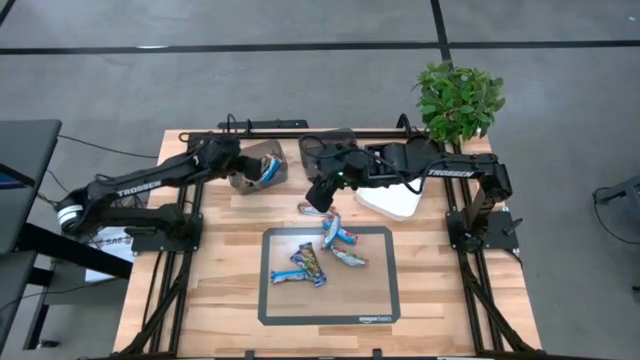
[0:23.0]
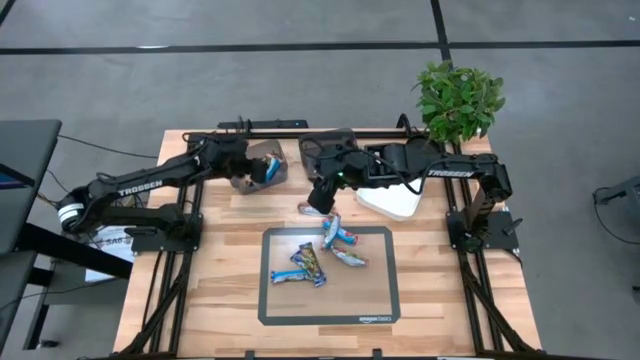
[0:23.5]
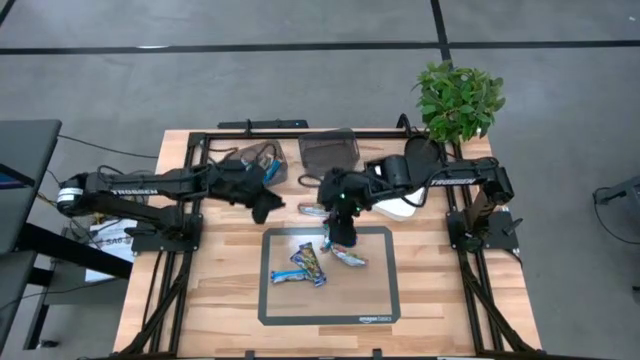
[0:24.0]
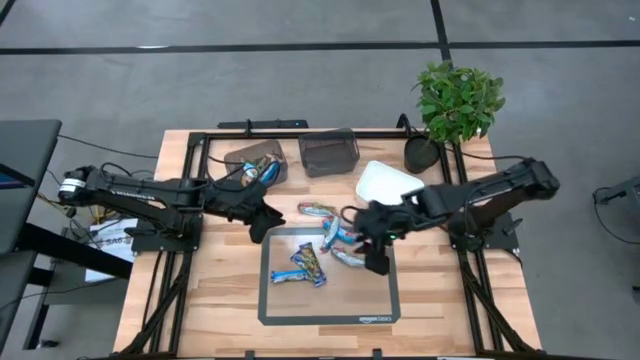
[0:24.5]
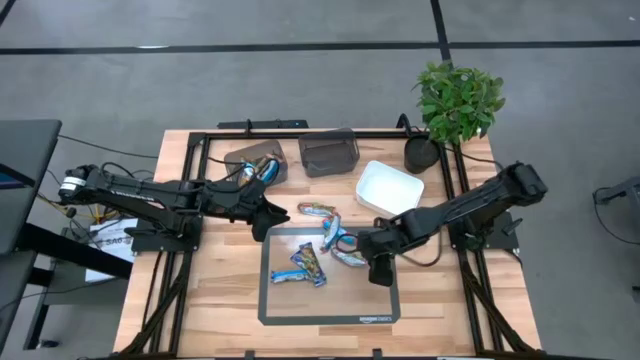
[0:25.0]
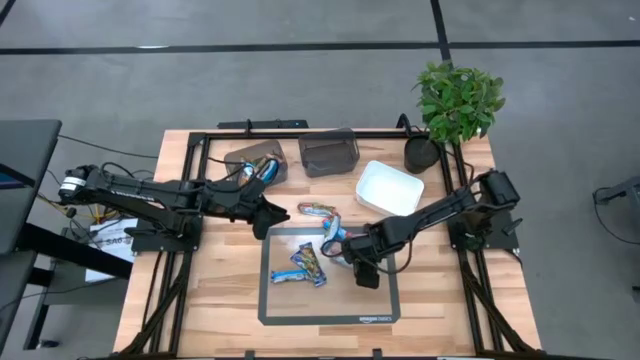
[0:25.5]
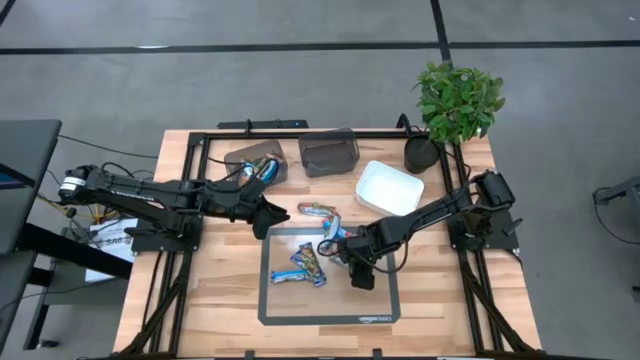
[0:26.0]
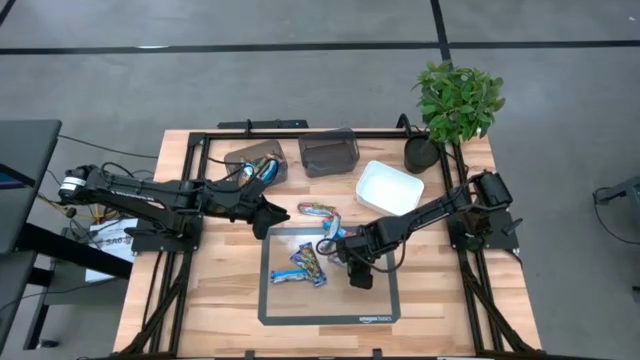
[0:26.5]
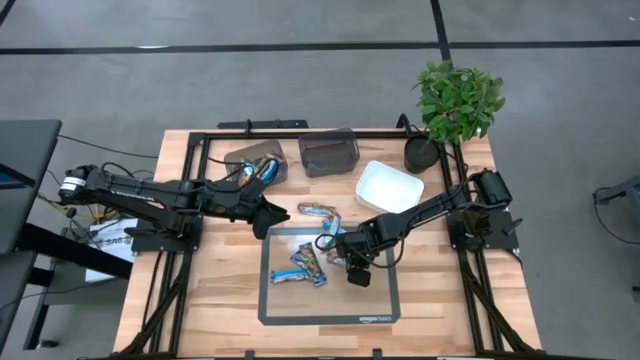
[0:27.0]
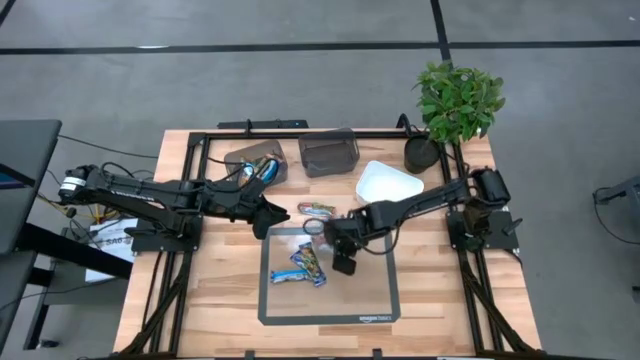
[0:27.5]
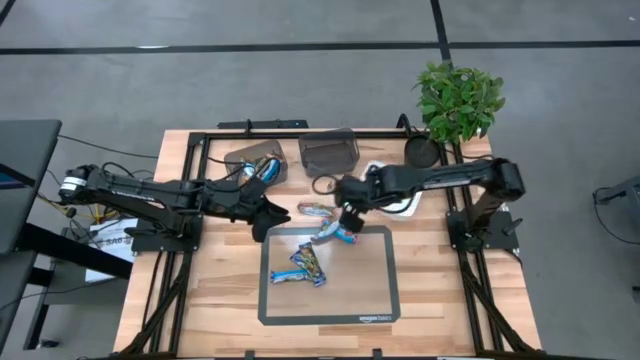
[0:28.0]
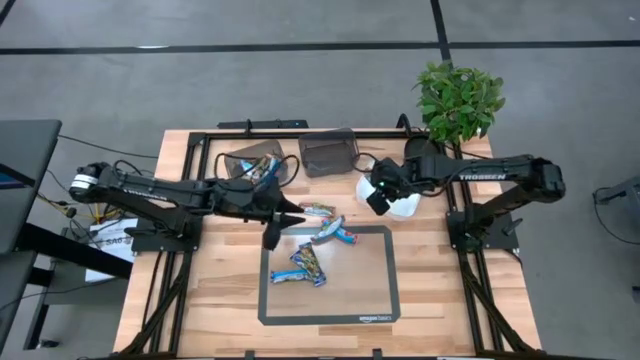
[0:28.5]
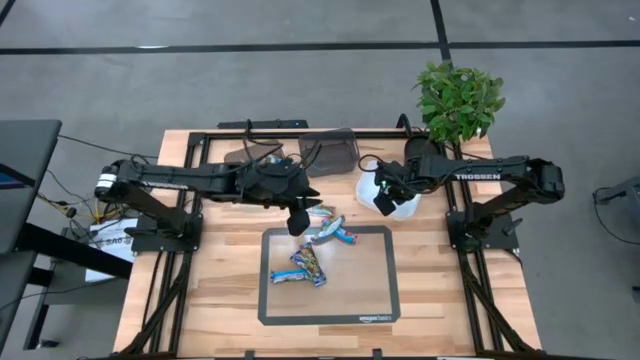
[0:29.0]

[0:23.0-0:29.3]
Task: Pick and place Granola Bars by type
Put the red granola bar into the white bin

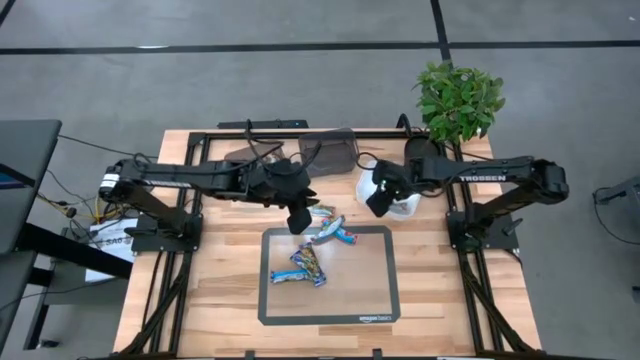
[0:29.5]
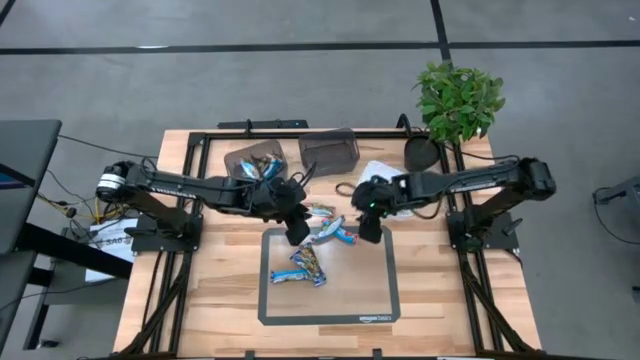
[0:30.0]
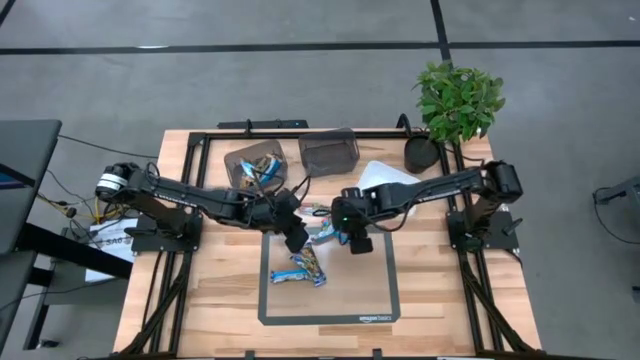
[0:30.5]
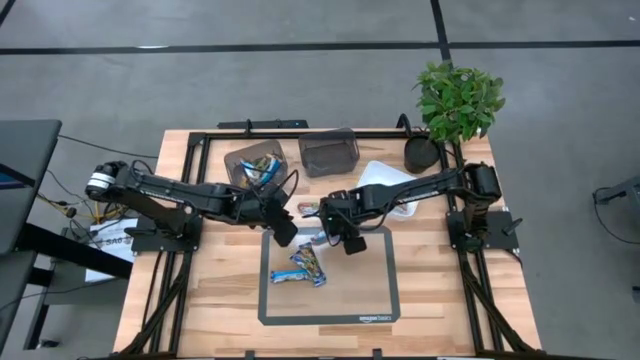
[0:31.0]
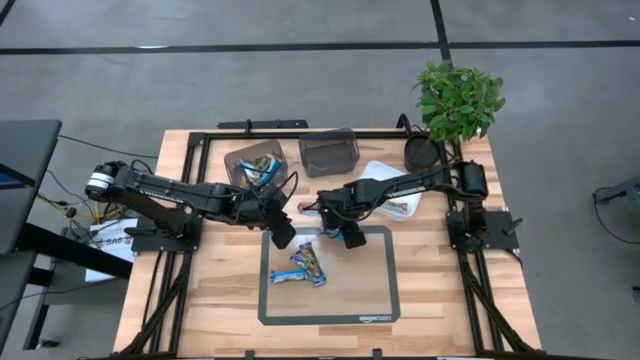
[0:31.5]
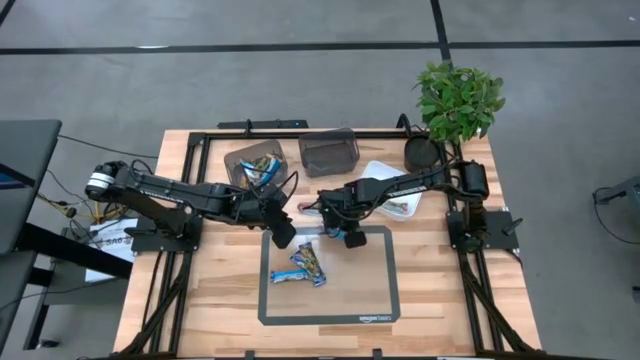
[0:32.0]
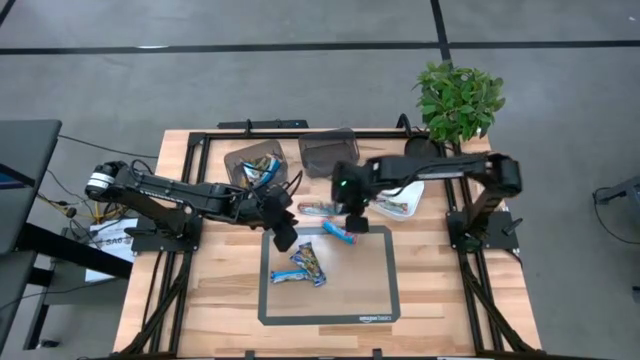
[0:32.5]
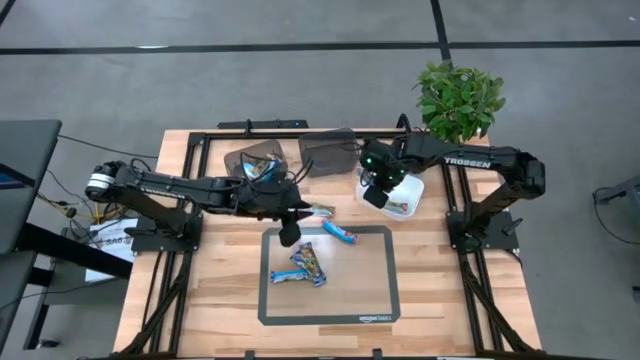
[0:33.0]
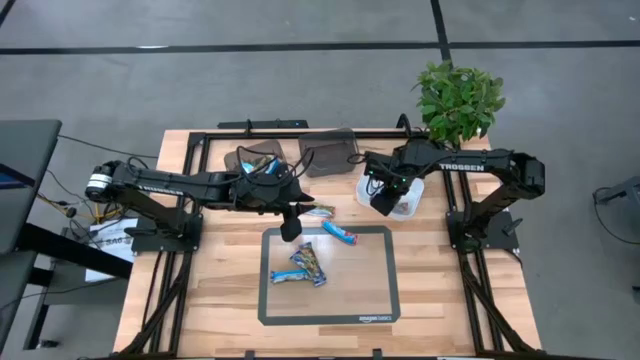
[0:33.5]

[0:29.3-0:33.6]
Put the red granola bar into the white bin

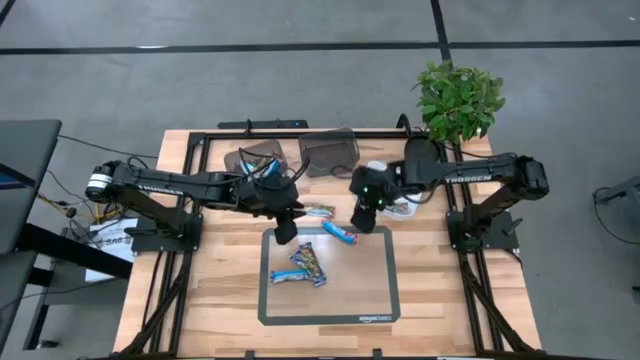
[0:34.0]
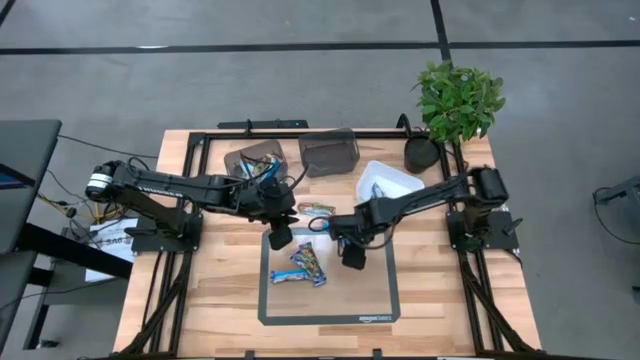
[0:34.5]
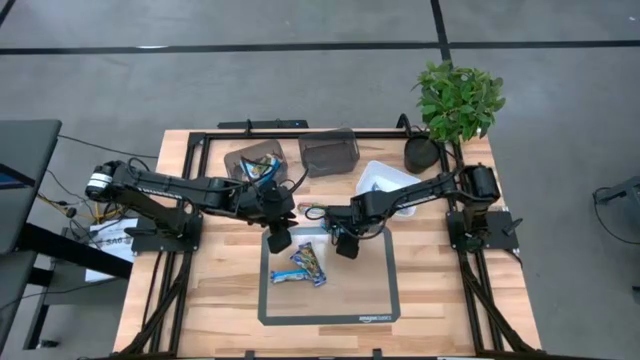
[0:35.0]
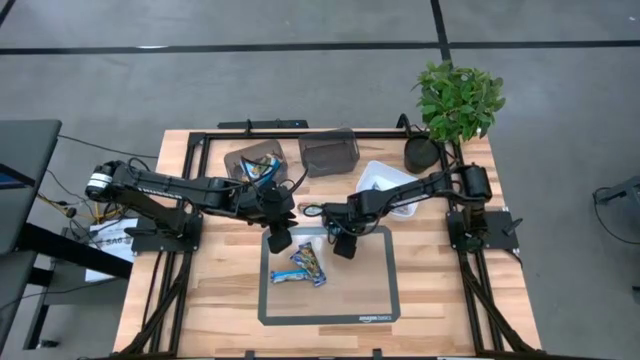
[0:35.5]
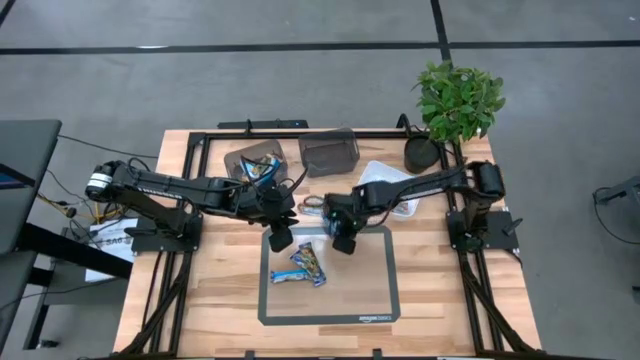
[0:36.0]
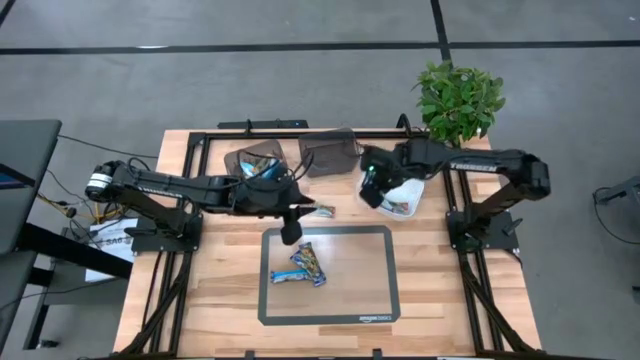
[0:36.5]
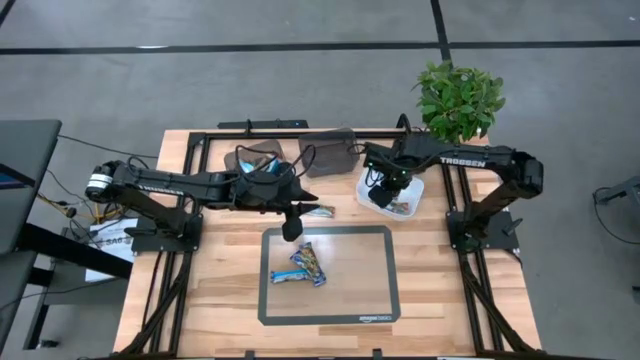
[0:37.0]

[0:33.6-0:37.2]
Put the red granola bar into the white bin

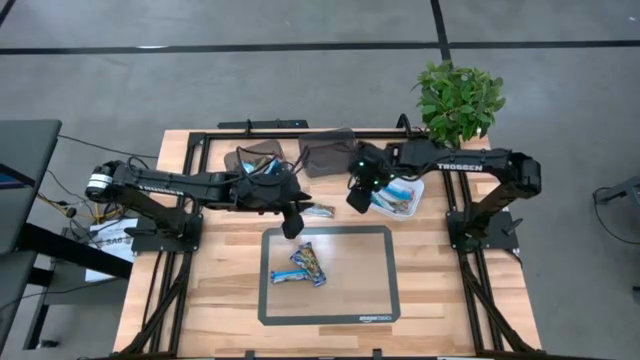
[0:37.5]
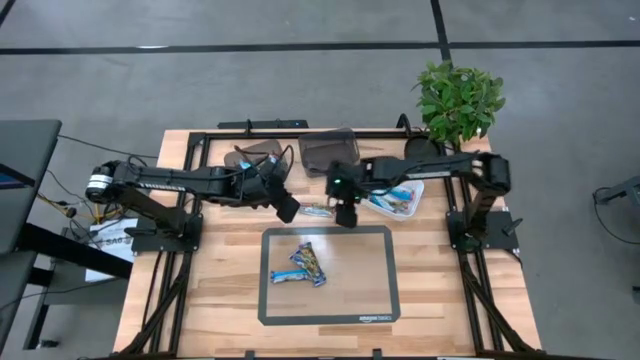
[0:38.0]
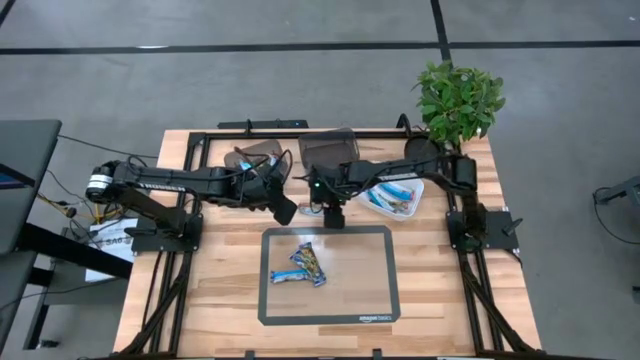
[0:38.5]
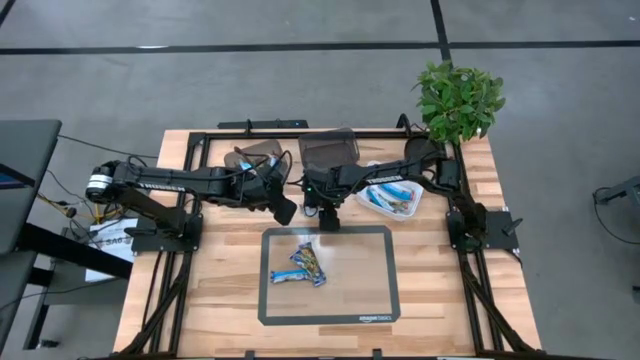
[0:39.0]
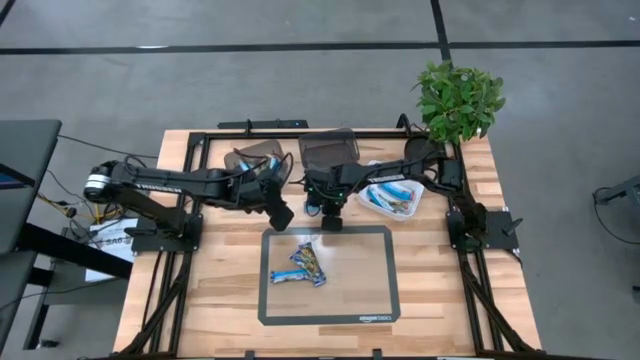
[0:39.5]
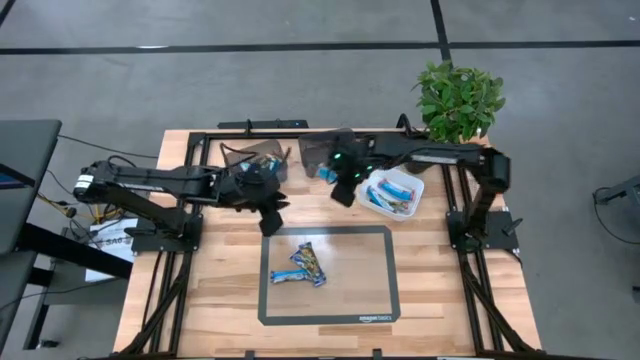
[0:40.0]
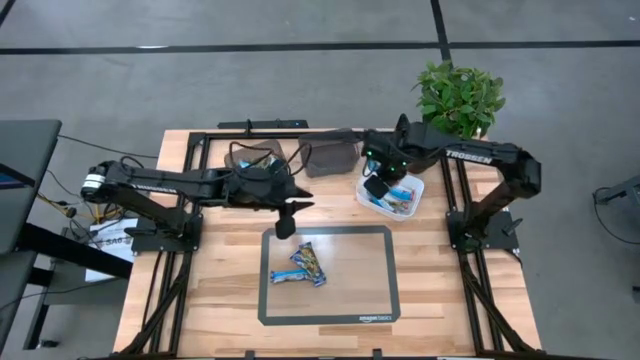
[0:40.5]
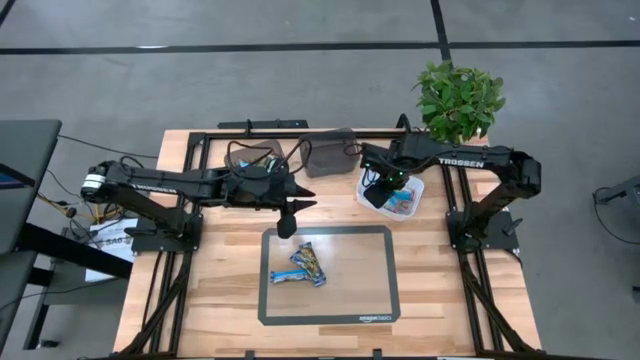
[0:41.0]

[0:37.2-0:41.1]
Put the red granola bar into the white bin

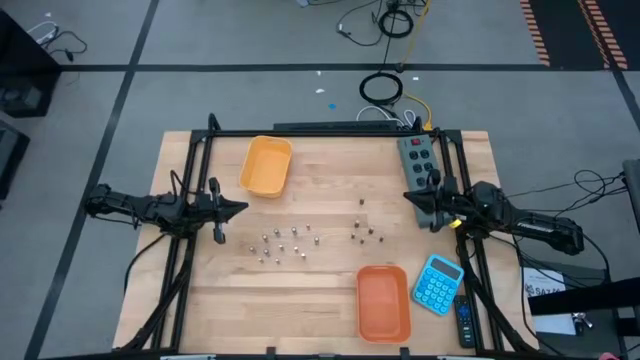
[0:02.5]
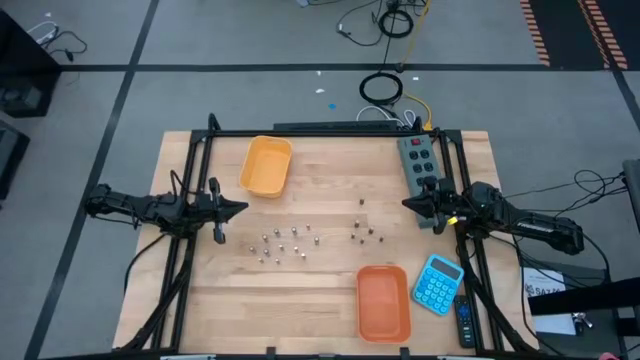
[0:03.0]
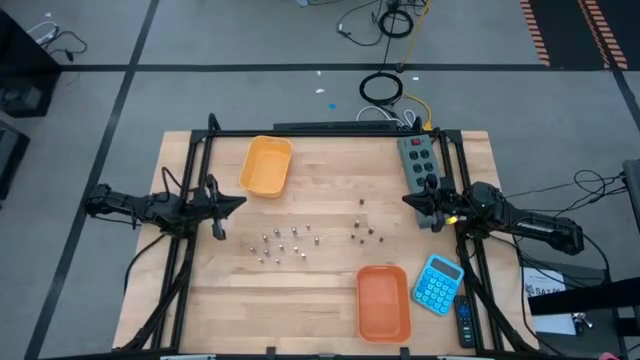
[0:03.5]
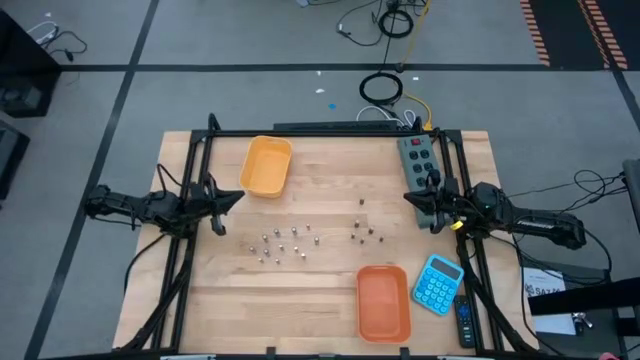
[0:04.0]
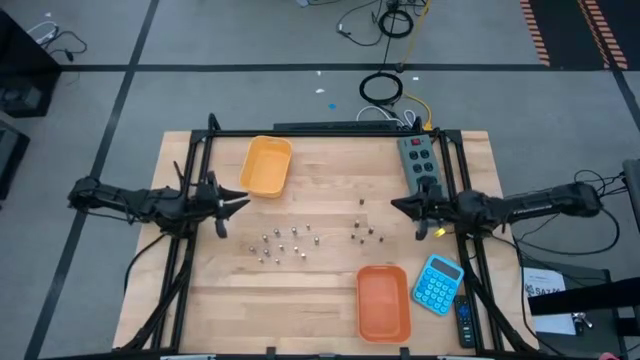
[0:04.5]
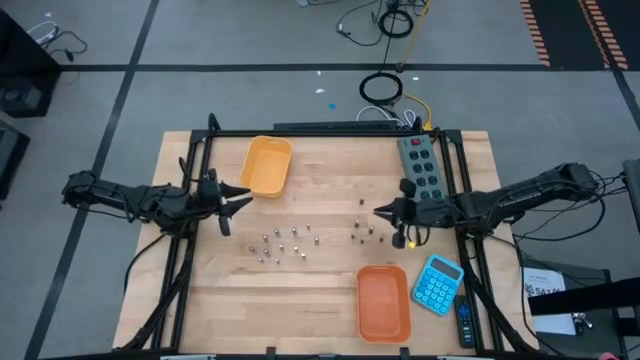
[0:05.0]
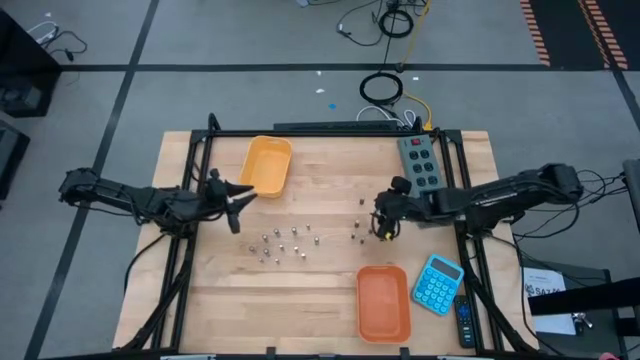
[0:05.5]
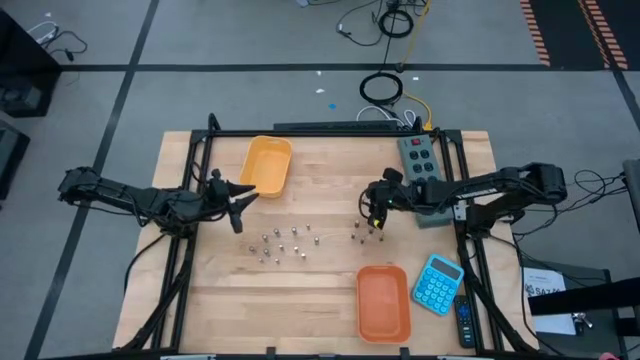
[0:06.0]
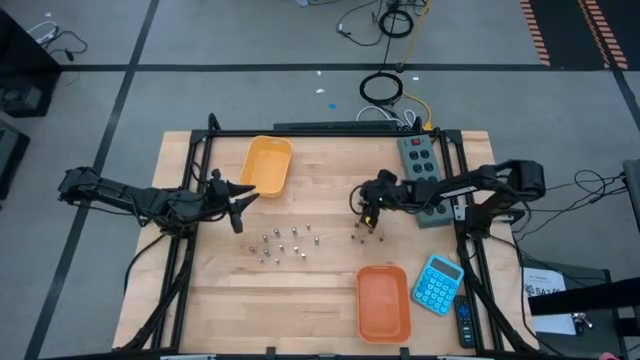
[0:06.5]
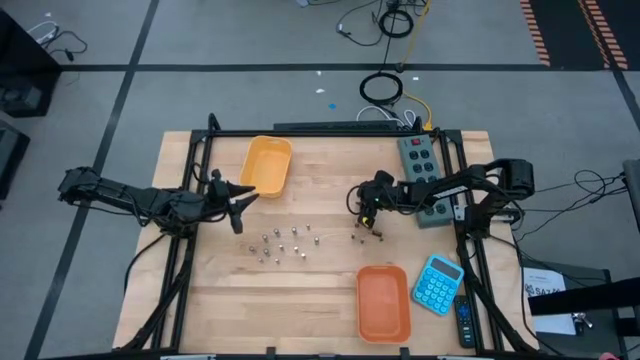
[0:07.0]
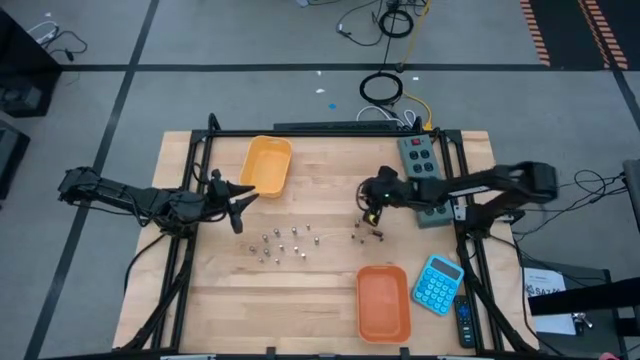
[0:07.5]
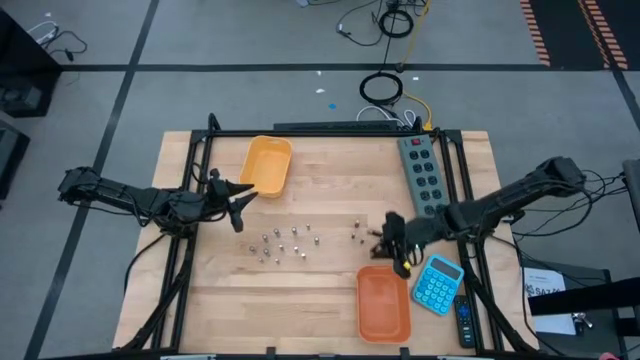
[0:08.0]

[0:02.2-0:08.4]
Task: Sort batteries
Put the black battery into the orange bin
